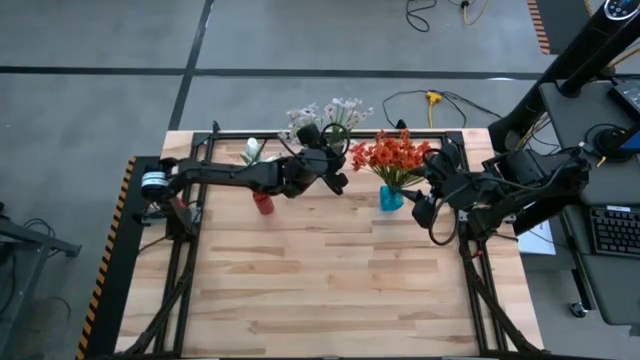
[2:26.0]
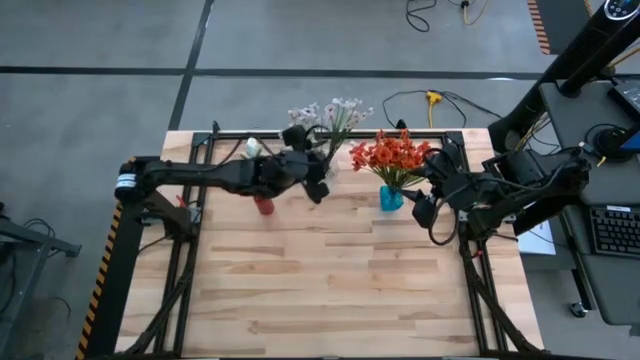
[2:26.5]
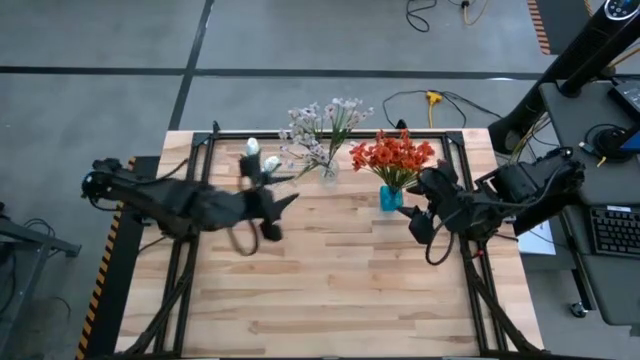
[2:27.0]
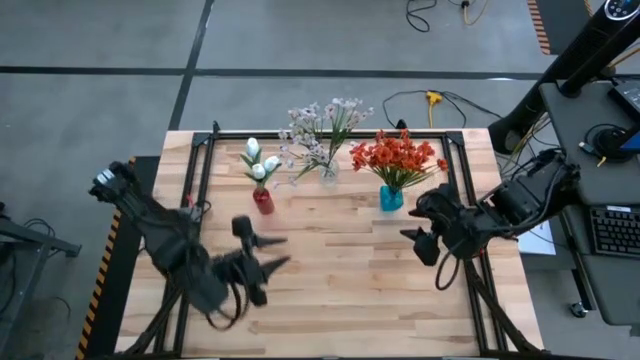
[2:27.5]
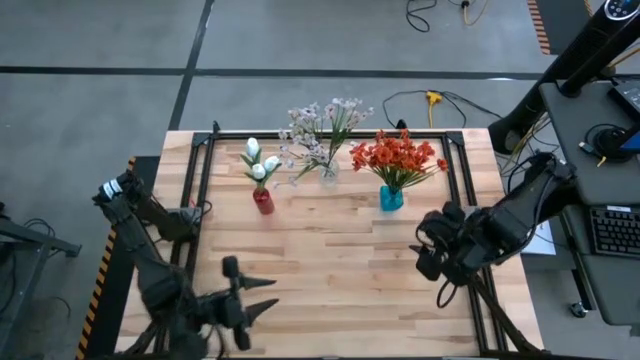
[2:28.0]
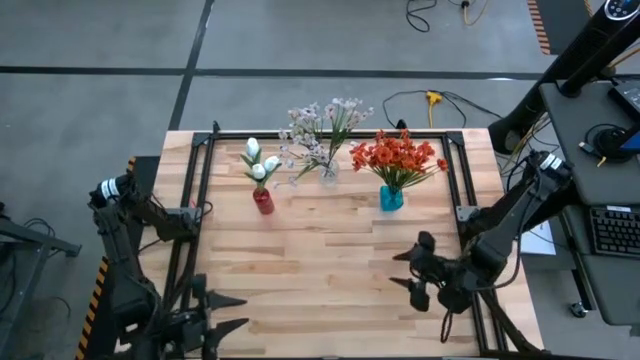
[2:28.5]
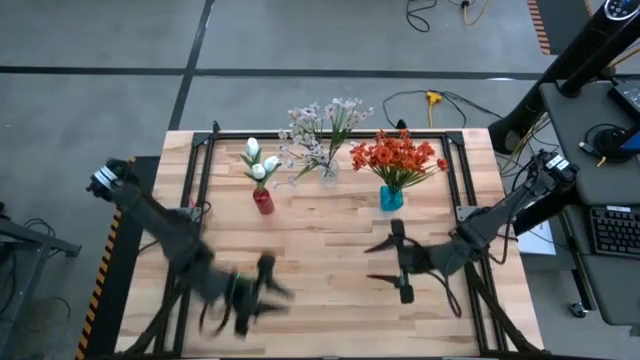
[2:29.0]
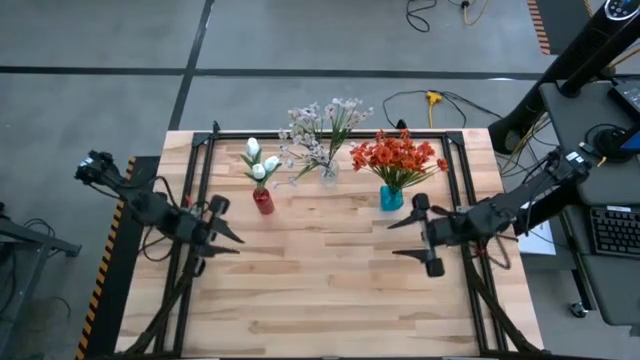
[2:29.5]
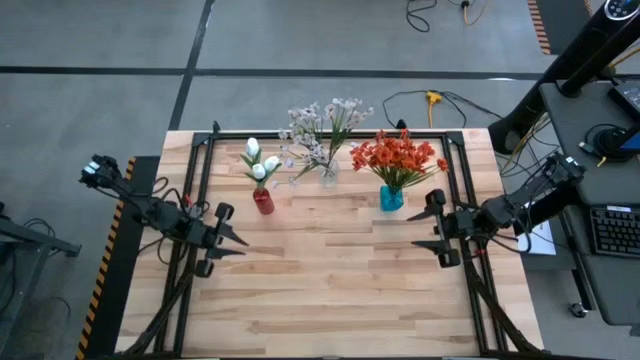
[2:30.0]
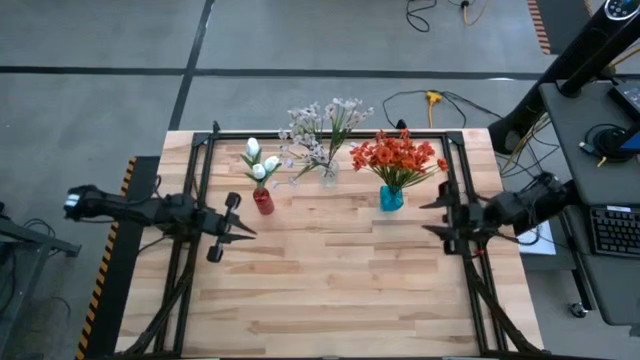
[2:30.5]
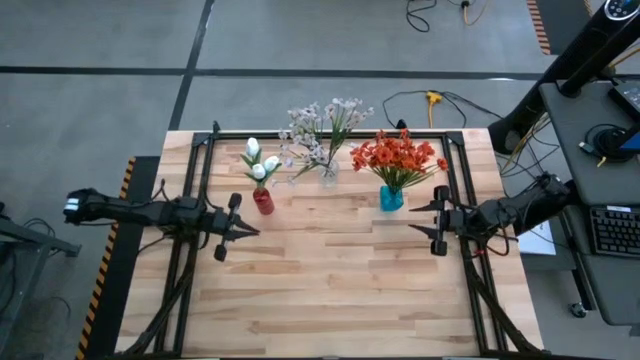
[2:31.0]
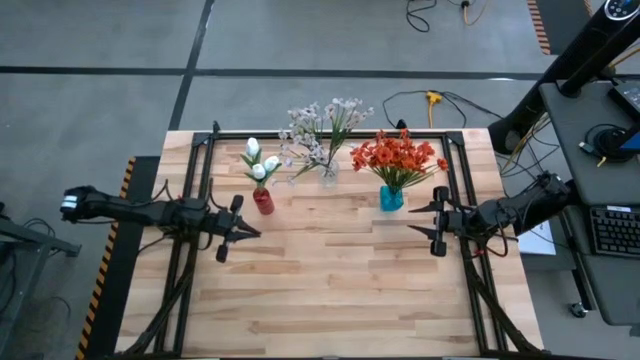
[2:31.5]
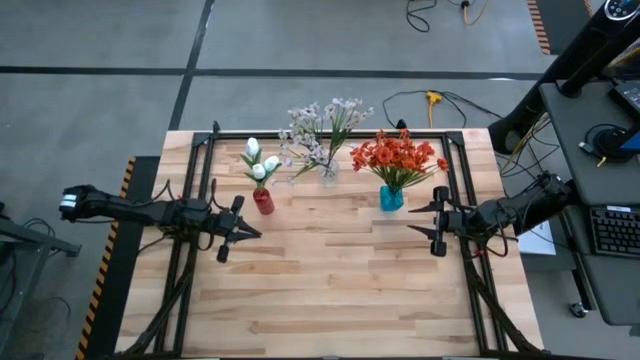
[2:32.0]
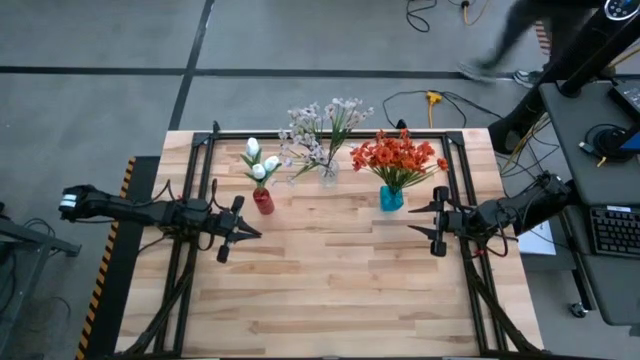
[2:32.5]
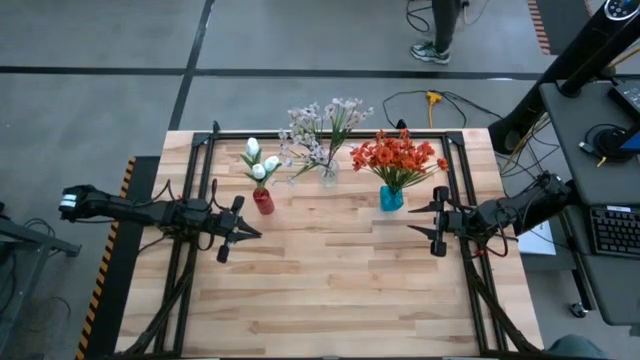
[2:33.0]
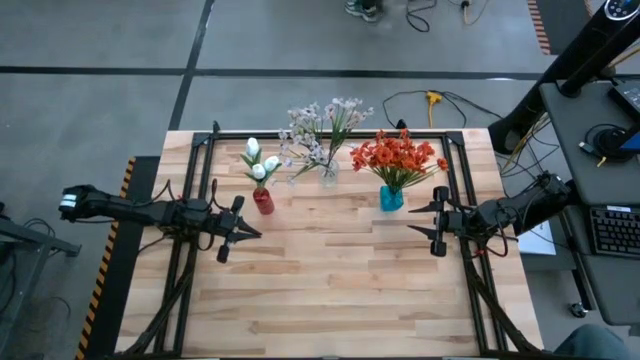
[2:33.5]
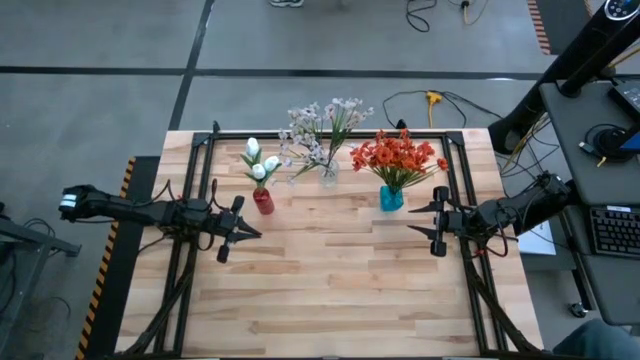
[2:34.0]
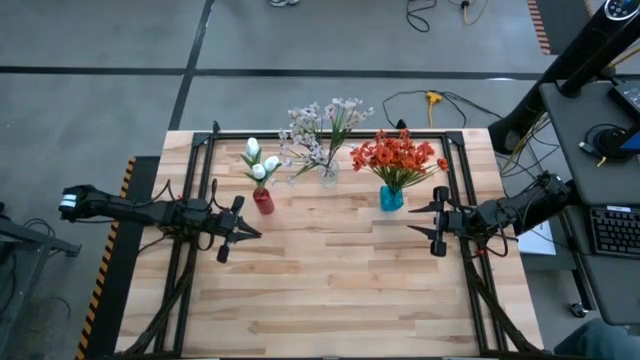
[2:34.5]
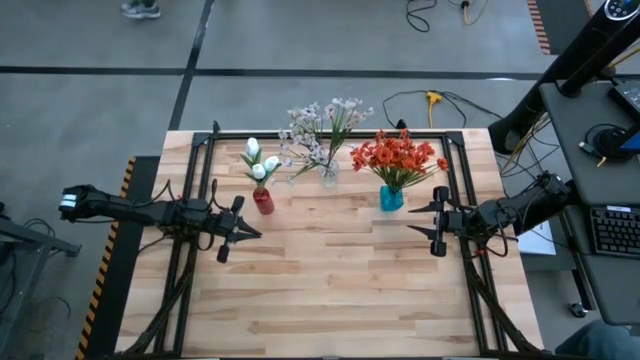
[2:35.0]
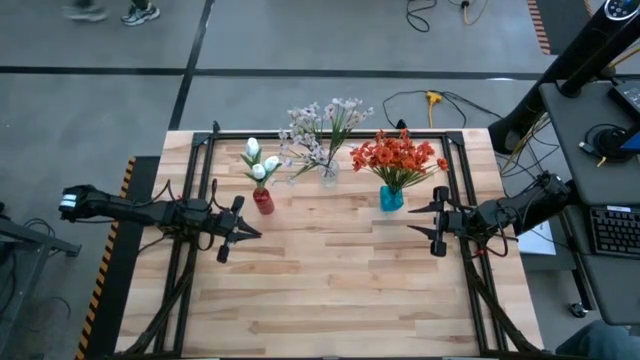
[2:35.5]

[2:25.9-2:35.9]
Task: Sort flowers into vase by color
Return to Home Position

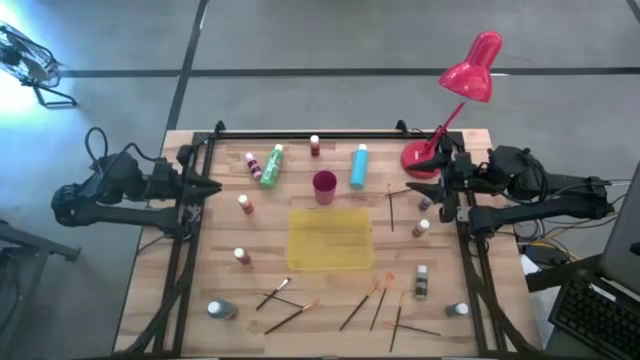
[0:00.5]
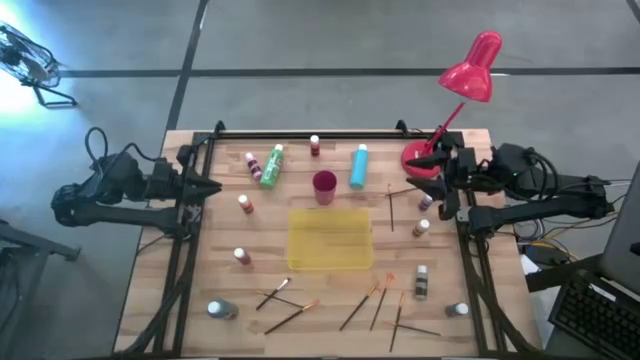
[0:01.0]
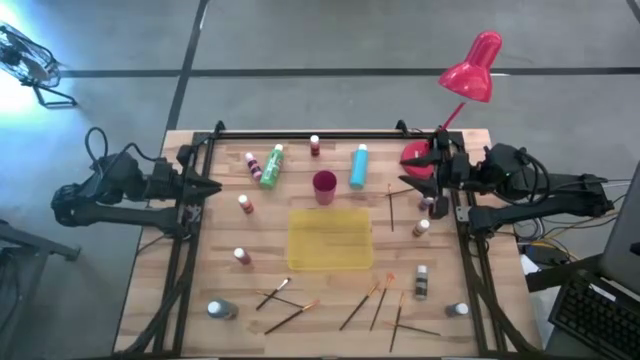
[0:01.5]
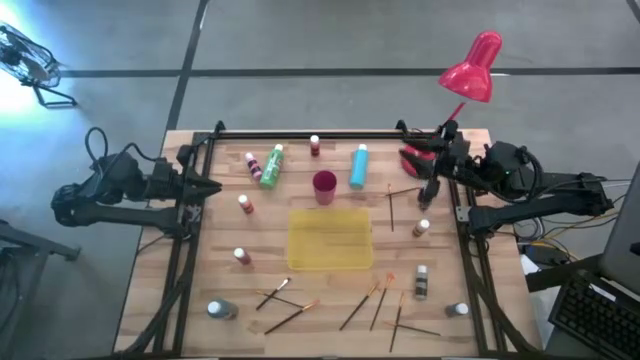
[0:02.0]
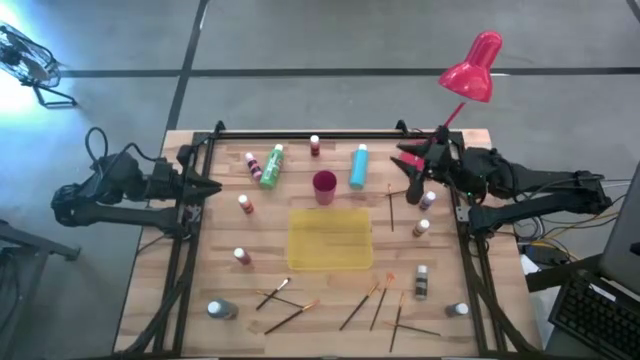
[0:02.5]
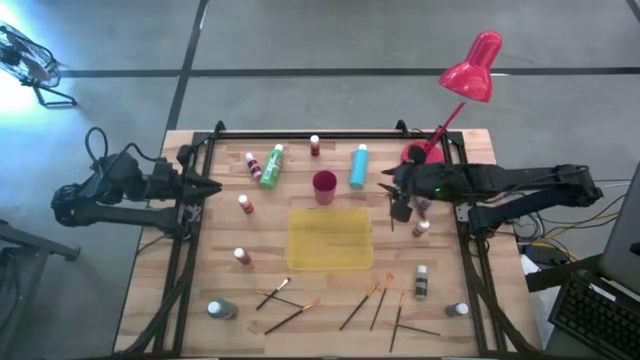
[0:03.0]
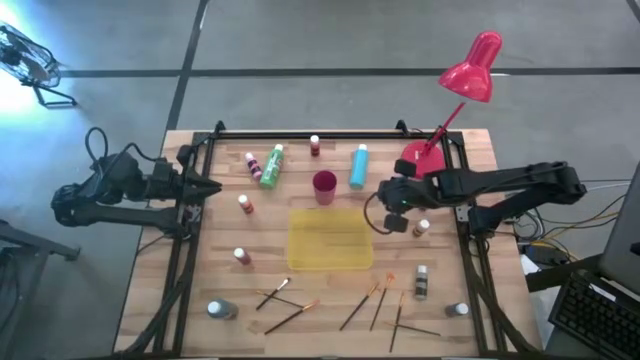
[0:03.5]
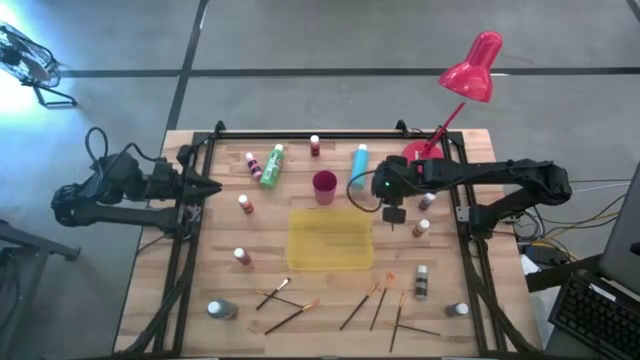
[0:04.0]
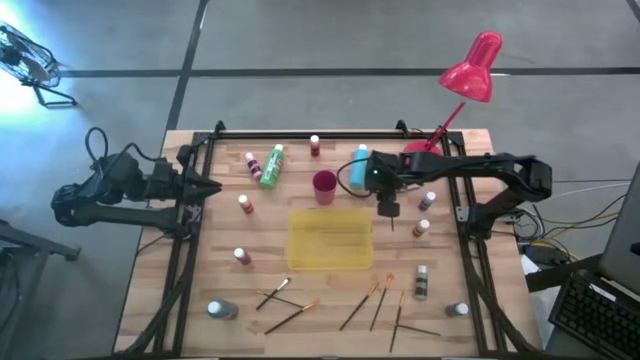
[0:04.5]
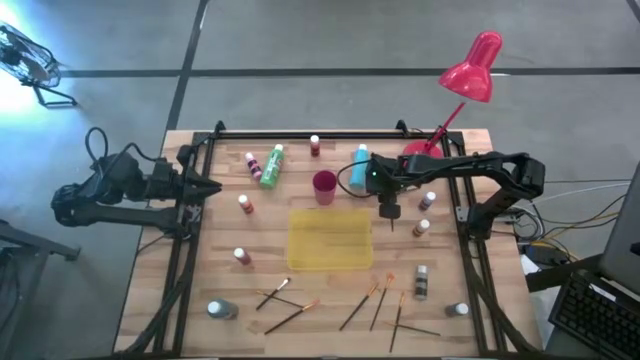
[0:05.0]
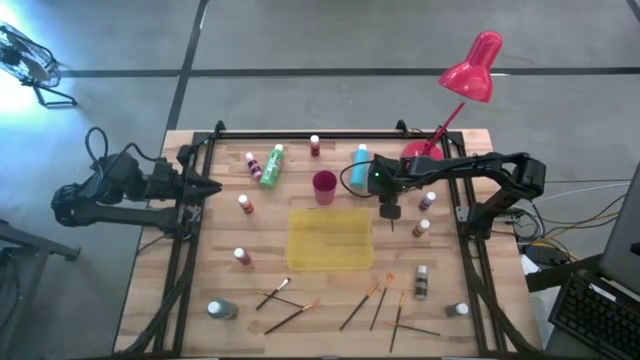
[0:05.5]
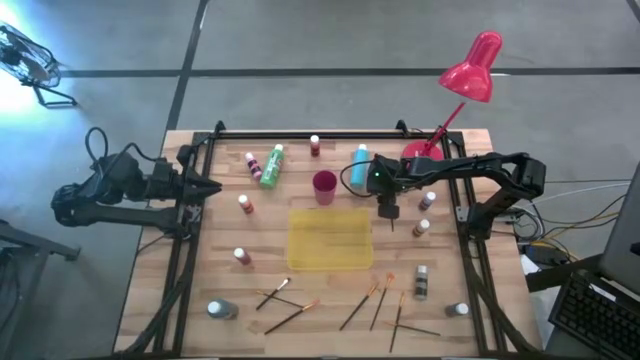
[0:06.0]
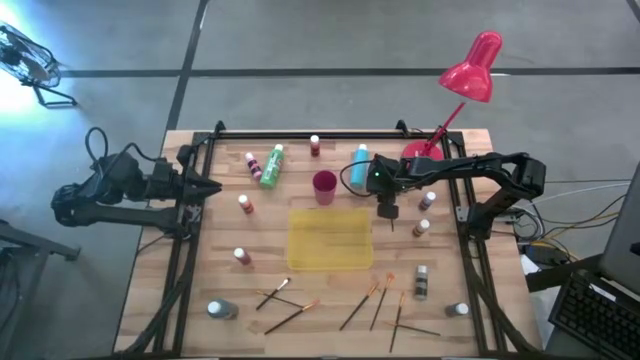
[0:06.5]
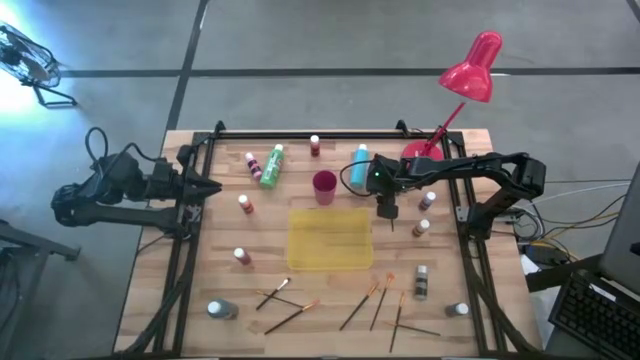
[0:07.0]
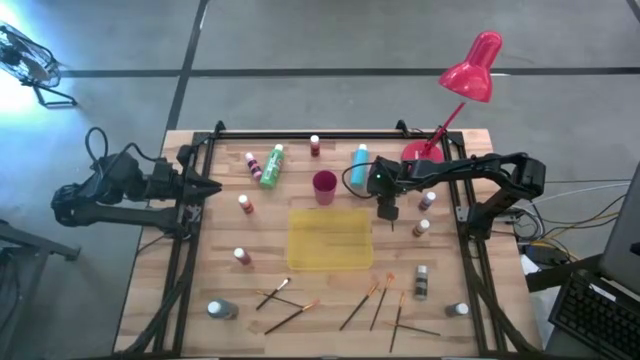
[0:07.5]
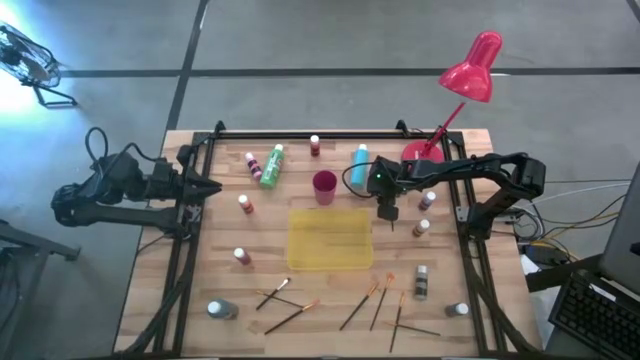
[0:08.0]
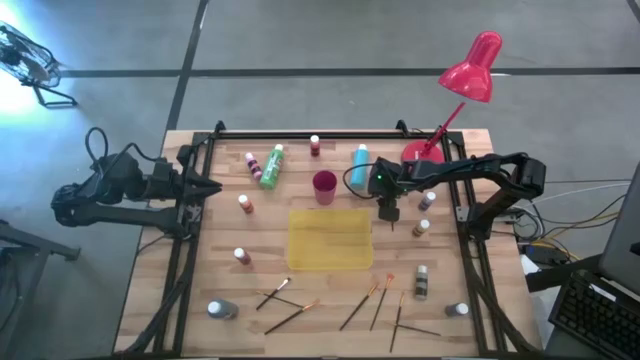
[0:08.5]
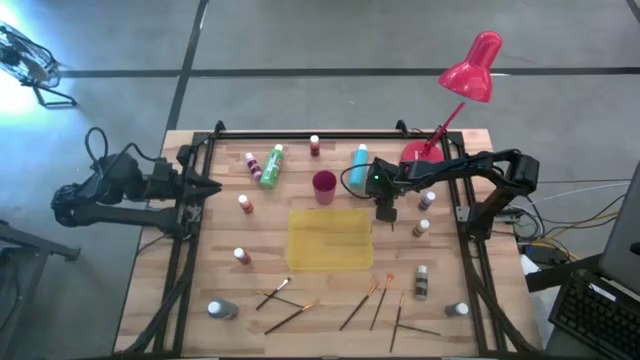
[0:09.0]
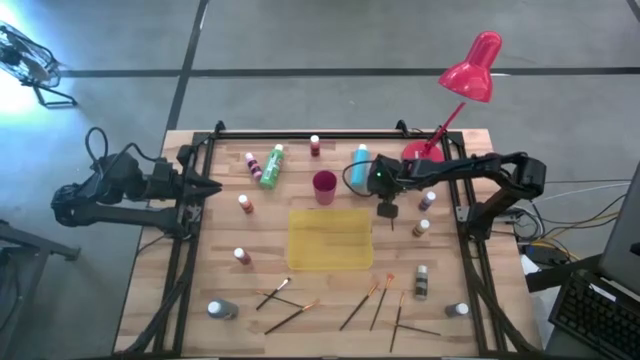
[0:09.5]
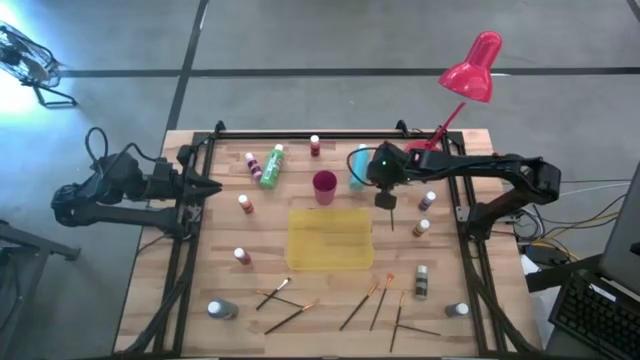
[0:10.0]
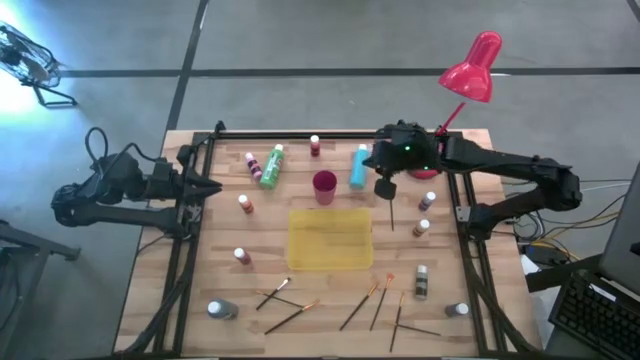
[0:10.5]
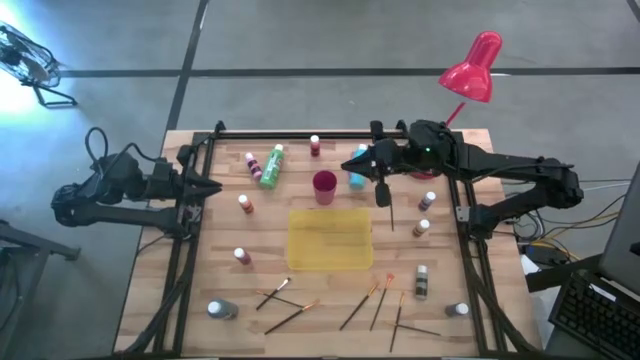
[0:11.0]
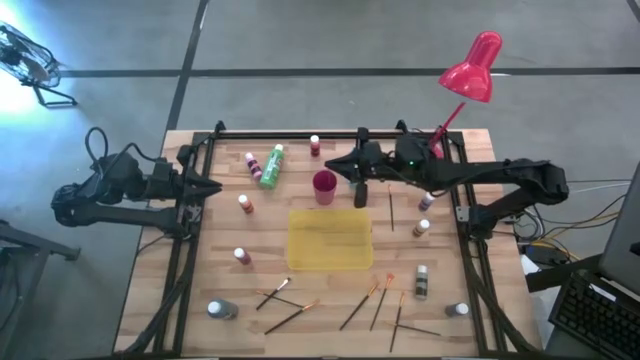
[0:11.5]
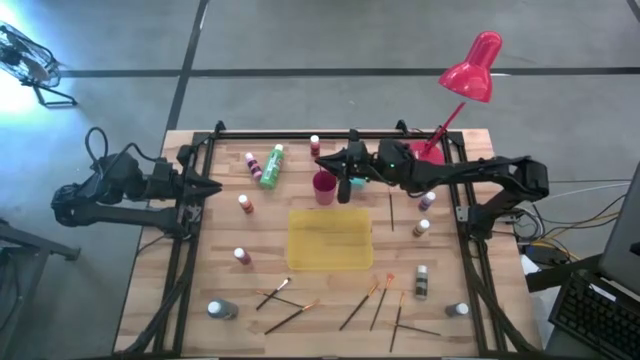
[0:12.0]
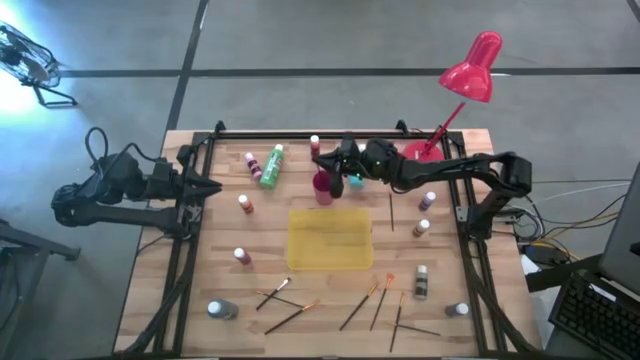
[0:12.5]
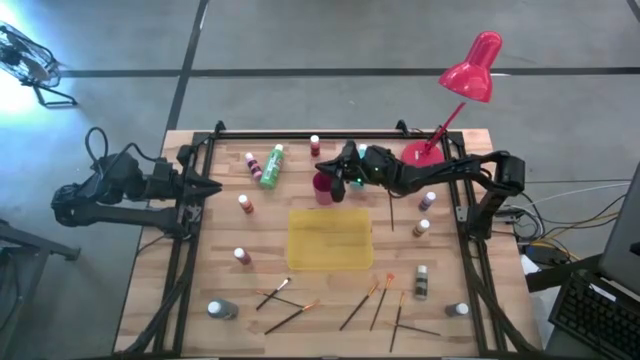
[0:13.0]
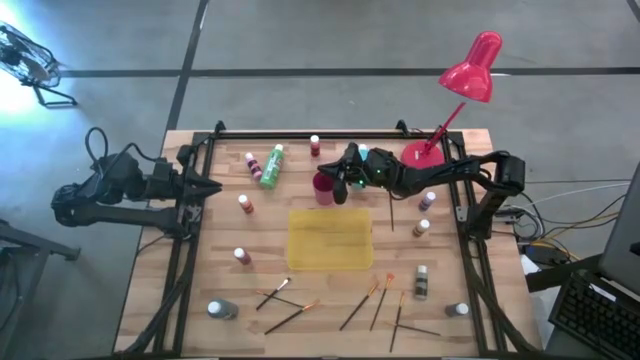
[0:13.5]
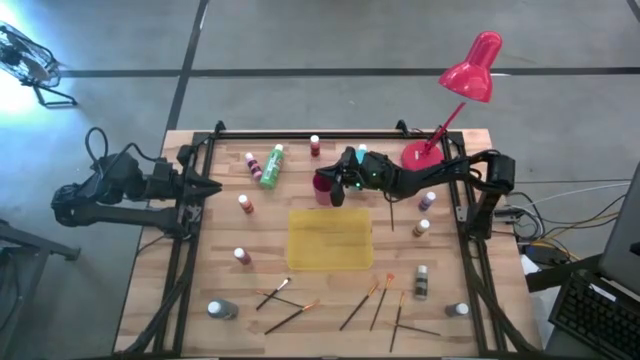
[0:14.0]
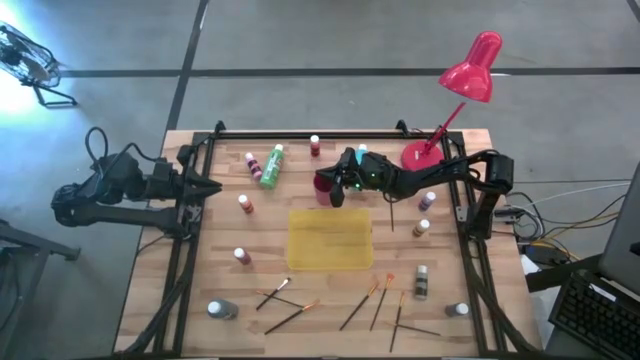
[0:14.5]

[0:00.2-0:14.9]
Task: Pick & Place Paint Supplies
Put the gold paint brush into the pink cup
